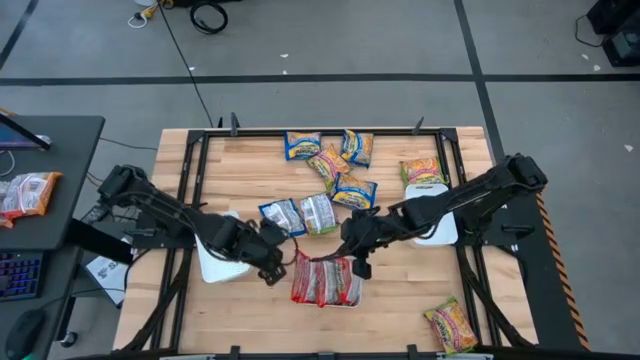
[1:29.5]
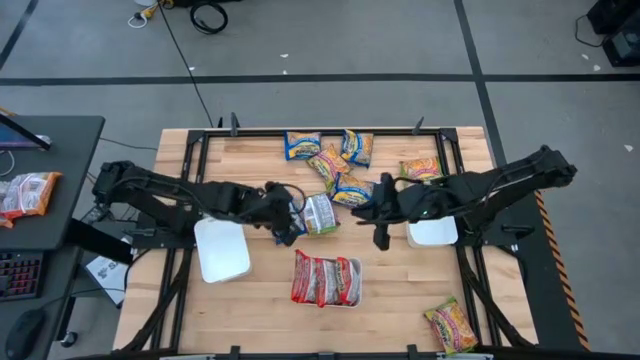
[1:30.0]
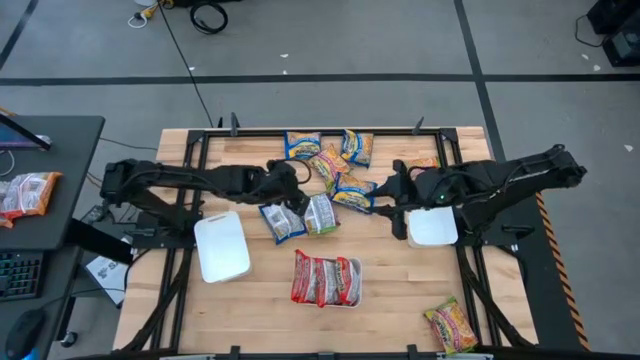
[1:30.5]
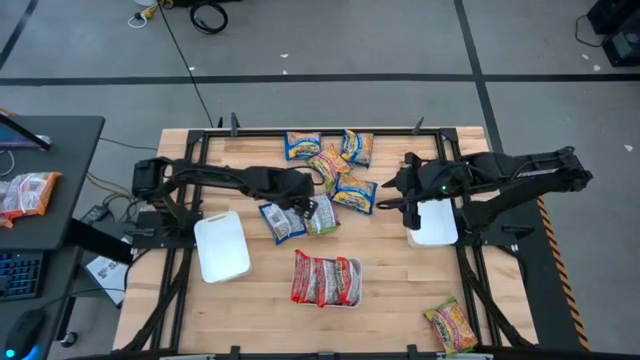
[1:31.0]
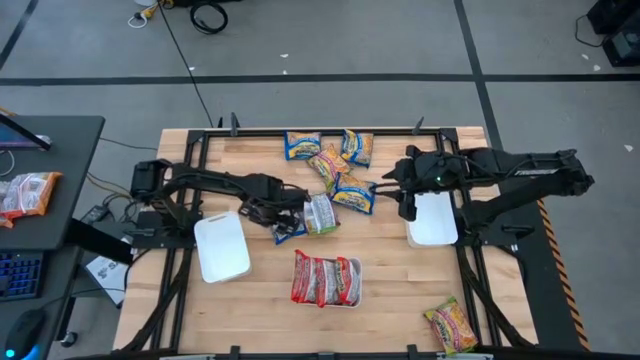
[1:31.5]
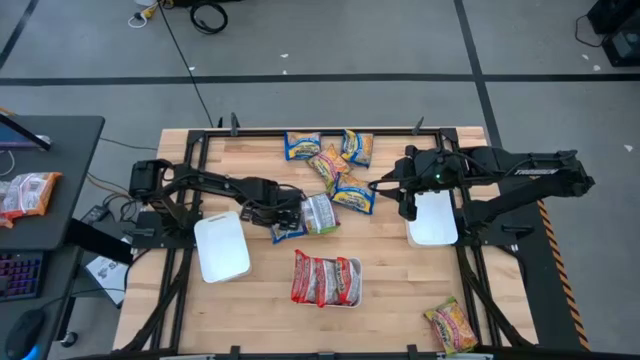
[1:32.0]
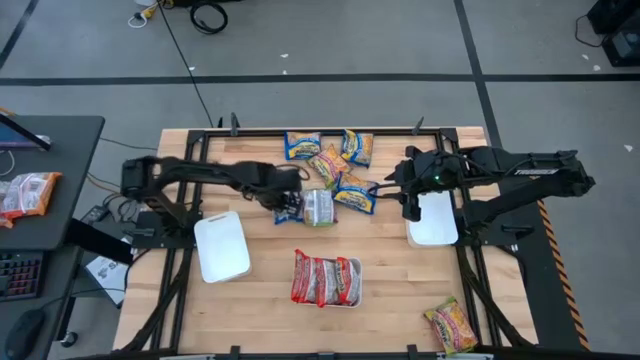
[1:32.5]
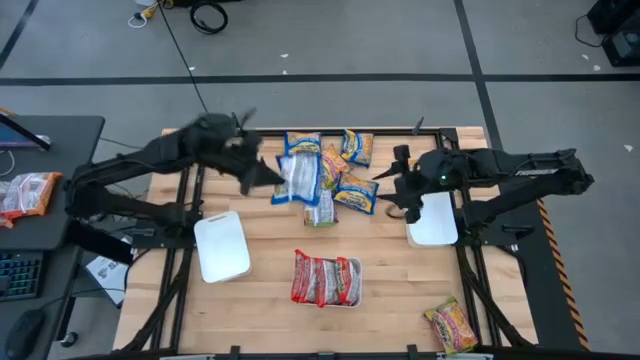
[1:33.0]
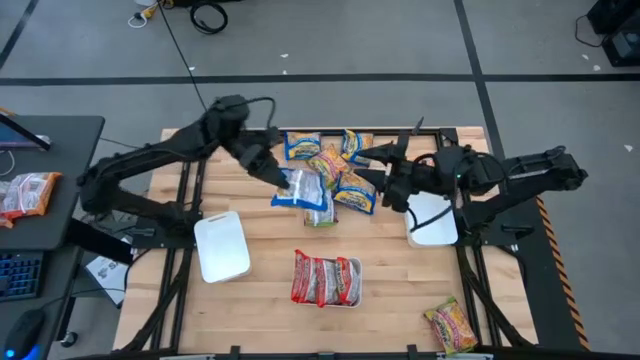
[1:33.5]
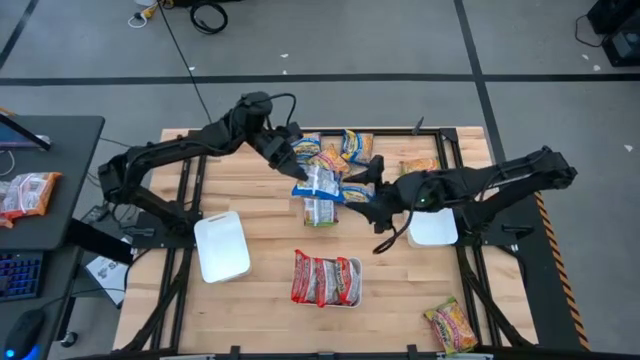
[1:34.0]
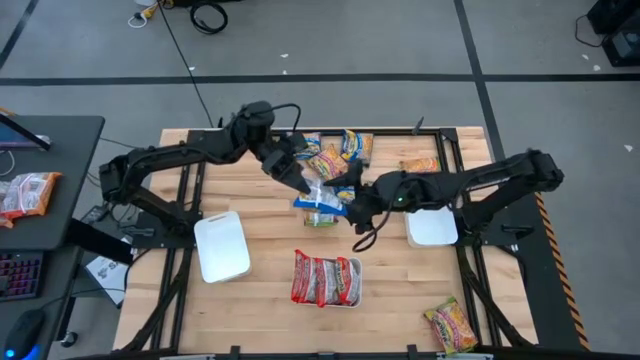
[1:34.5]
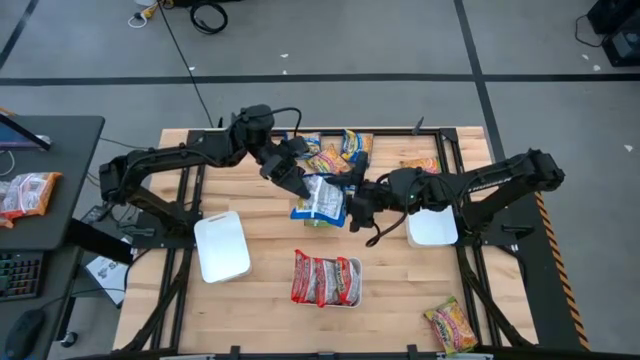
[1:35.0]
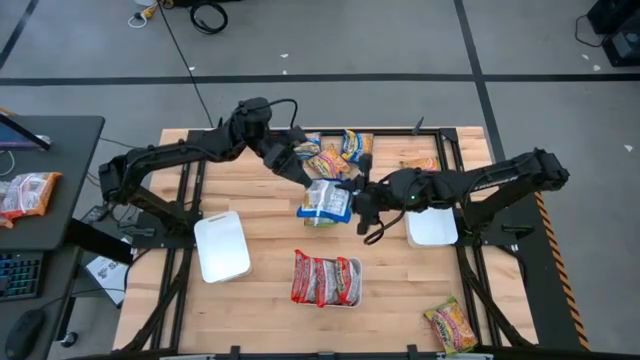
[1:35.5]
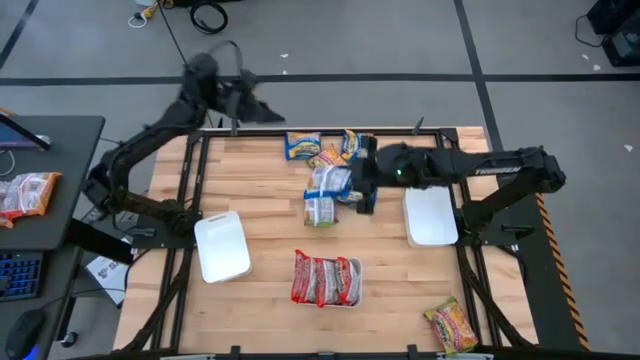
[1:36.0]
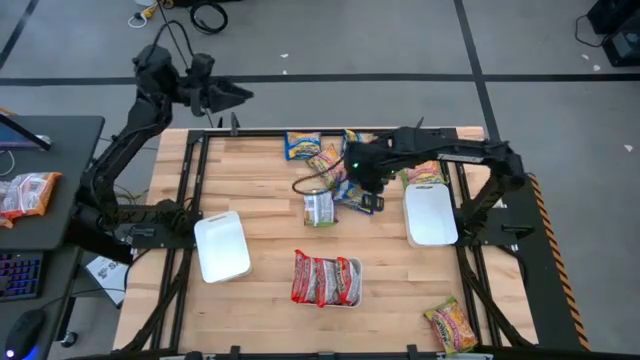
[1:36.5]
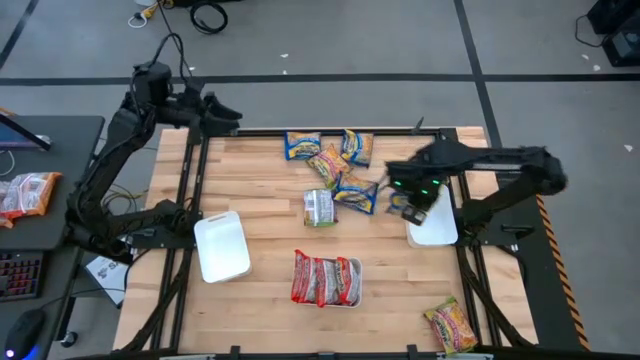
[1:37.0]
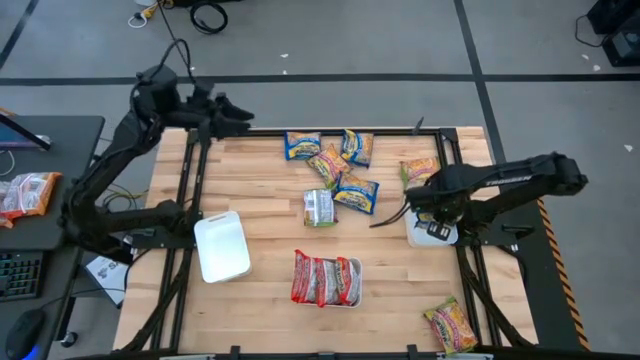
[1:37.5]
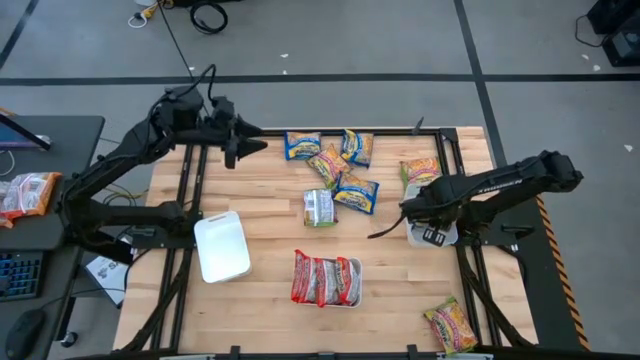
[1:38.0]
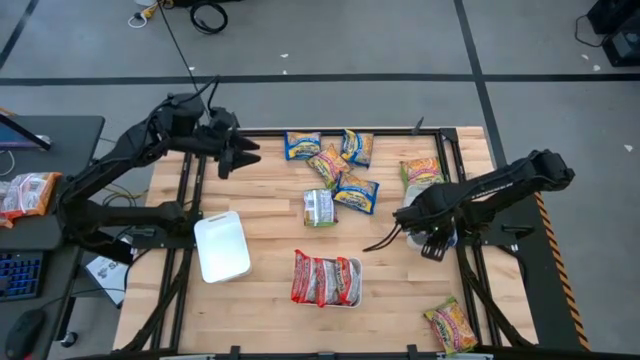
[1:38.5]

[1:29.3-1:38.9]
Task: Sort Maruchan noodles
Put the bottom left blue noodle pack into the right white bin

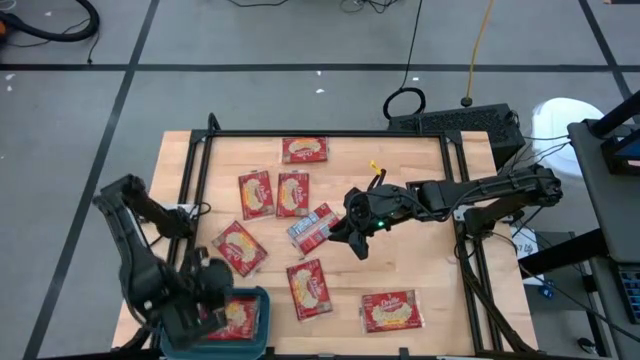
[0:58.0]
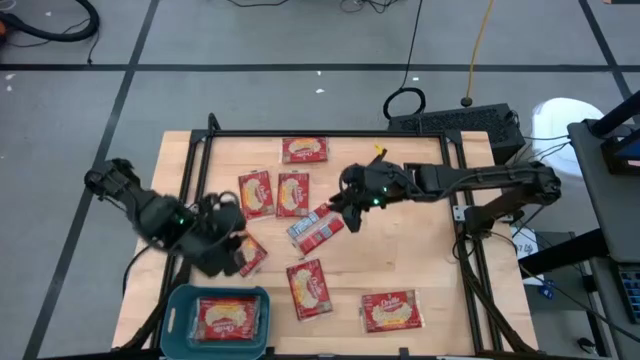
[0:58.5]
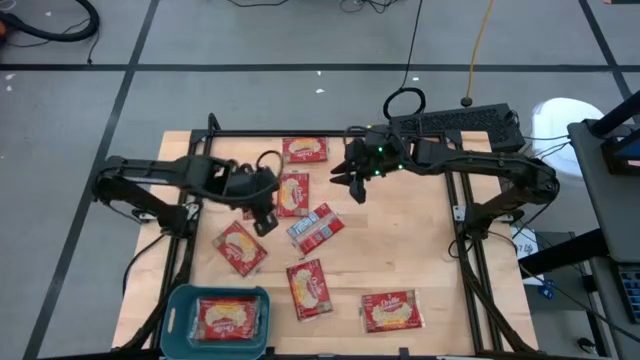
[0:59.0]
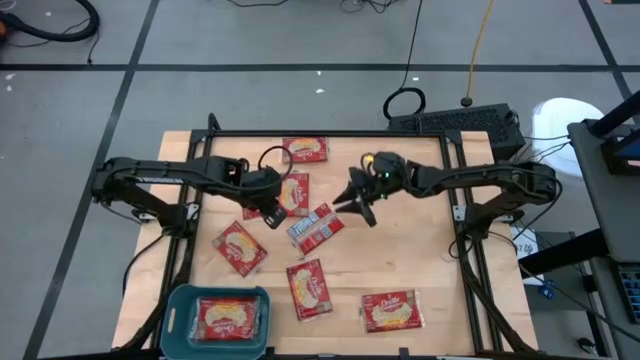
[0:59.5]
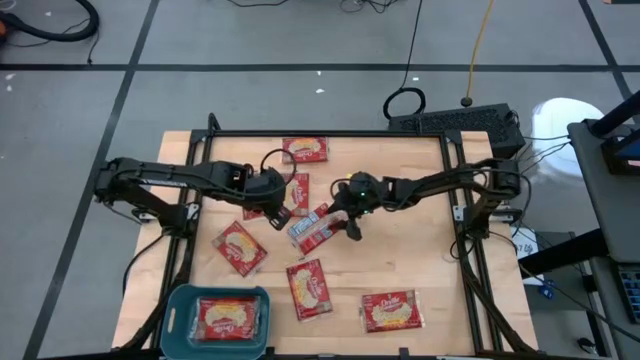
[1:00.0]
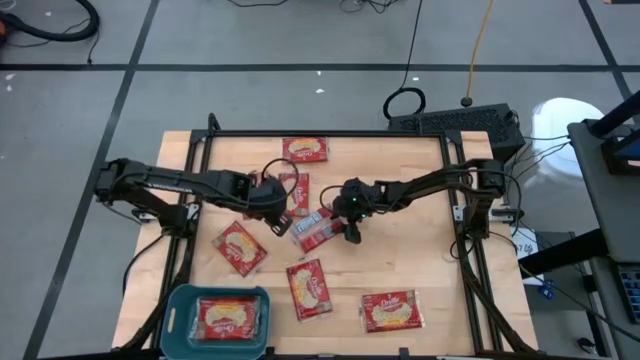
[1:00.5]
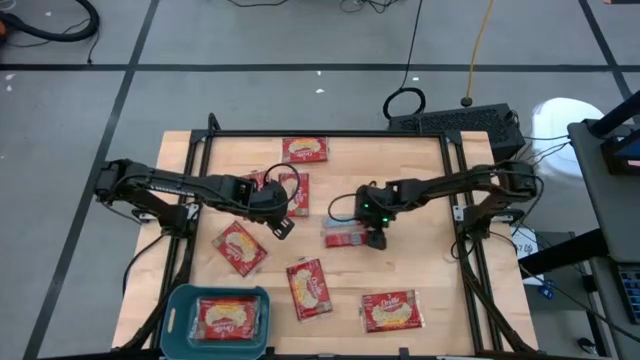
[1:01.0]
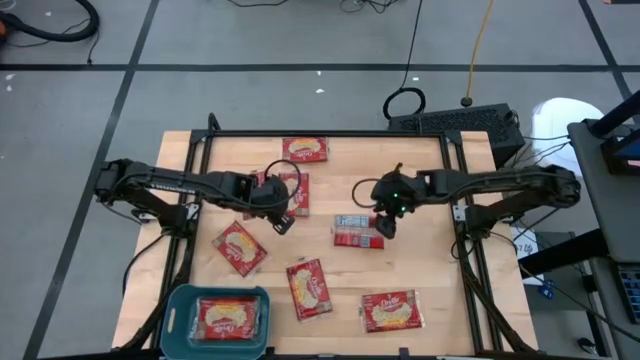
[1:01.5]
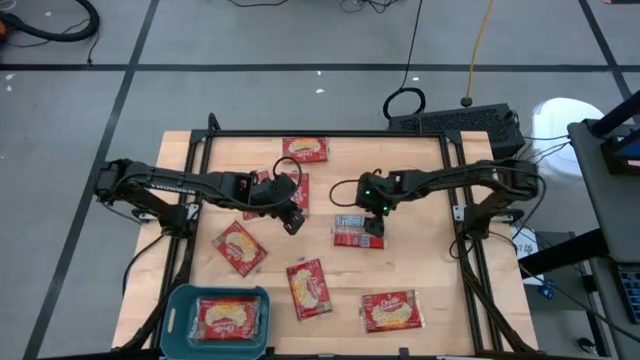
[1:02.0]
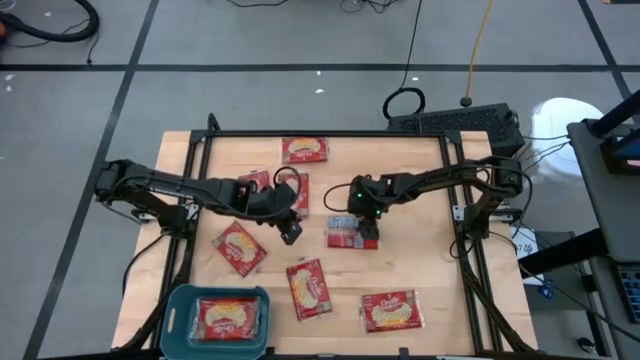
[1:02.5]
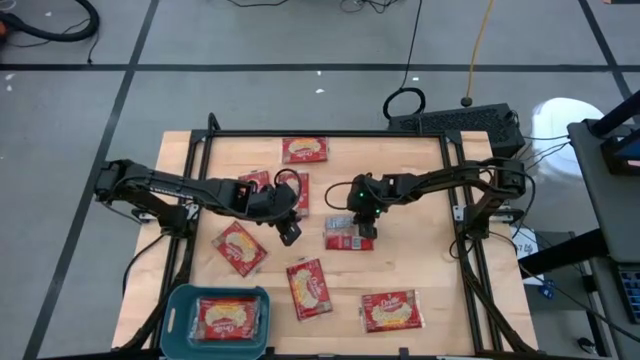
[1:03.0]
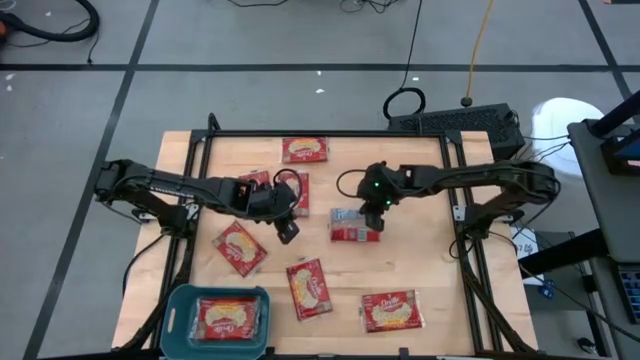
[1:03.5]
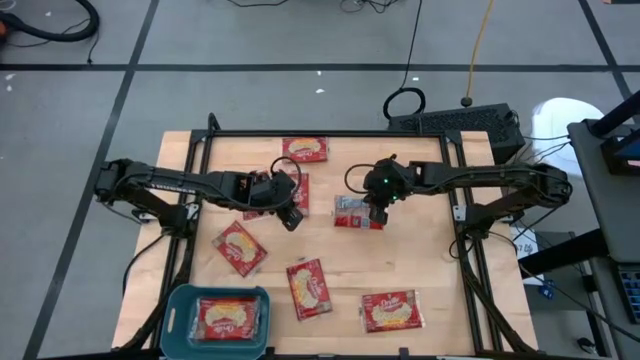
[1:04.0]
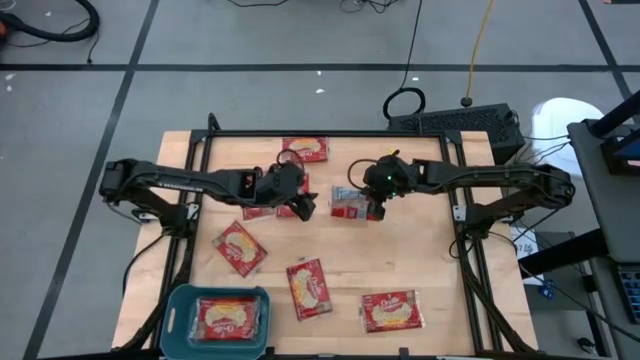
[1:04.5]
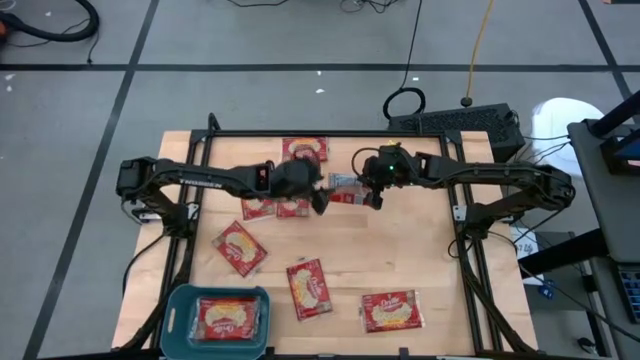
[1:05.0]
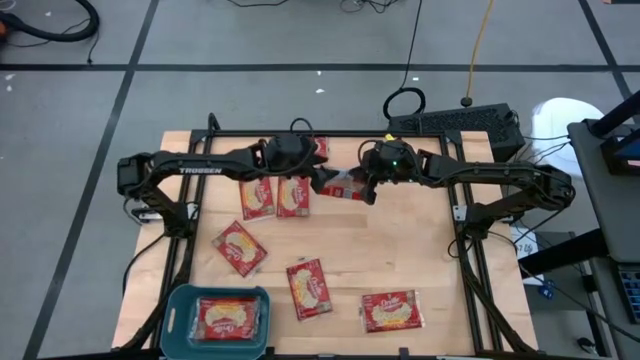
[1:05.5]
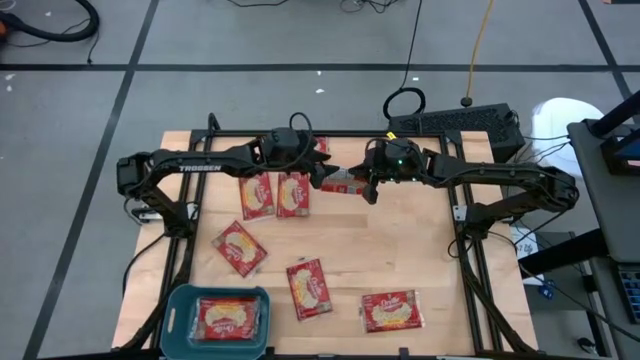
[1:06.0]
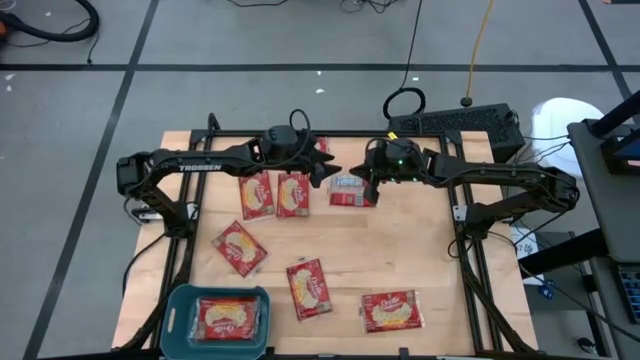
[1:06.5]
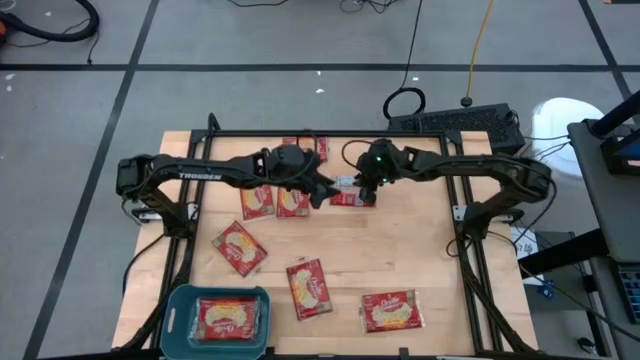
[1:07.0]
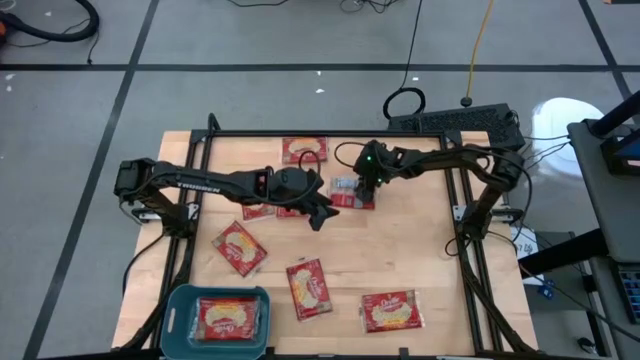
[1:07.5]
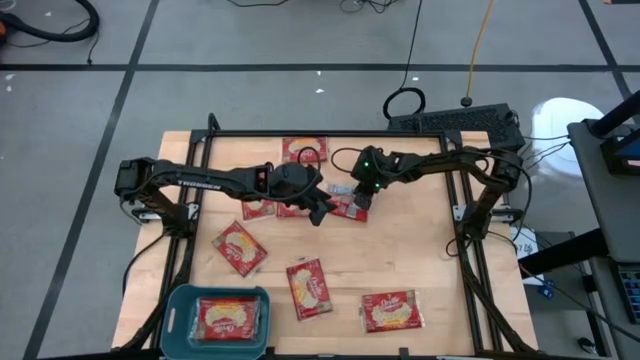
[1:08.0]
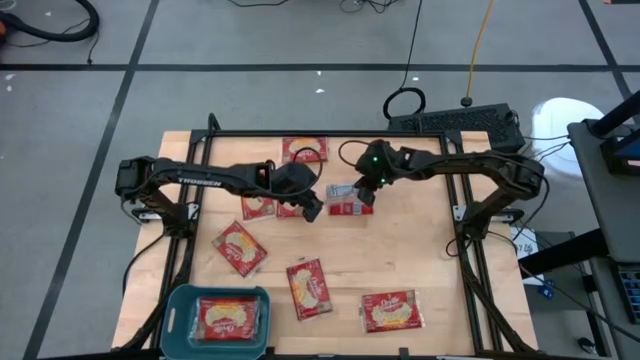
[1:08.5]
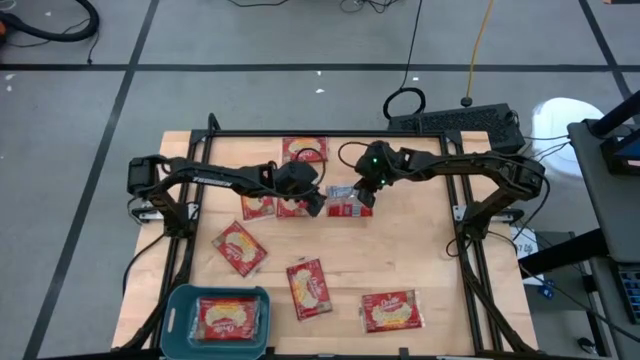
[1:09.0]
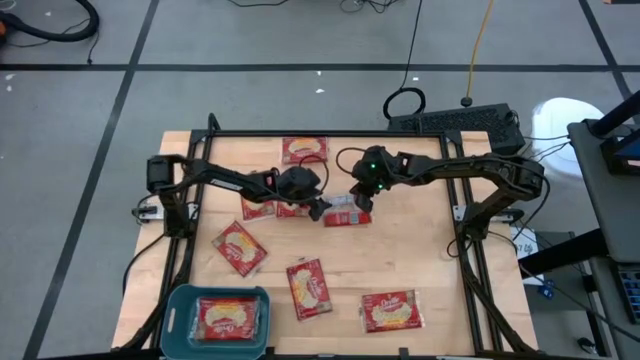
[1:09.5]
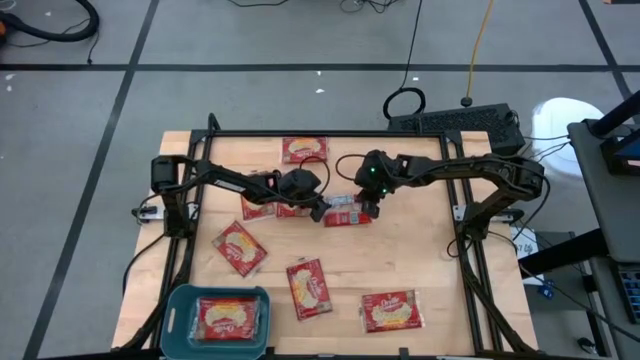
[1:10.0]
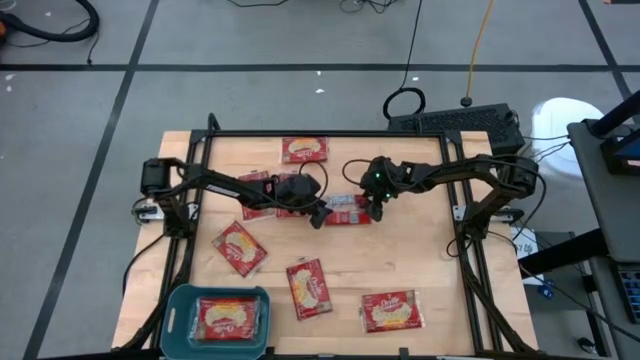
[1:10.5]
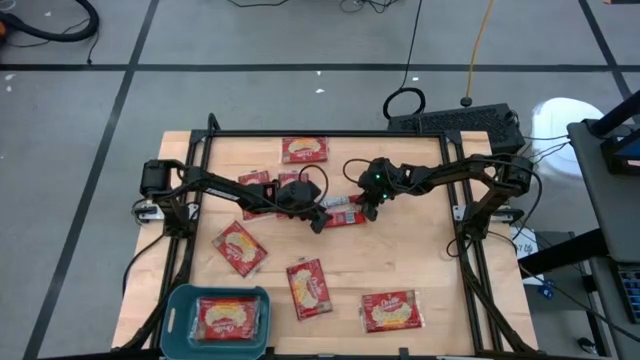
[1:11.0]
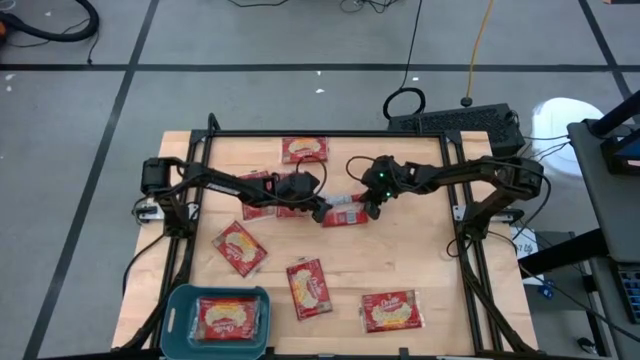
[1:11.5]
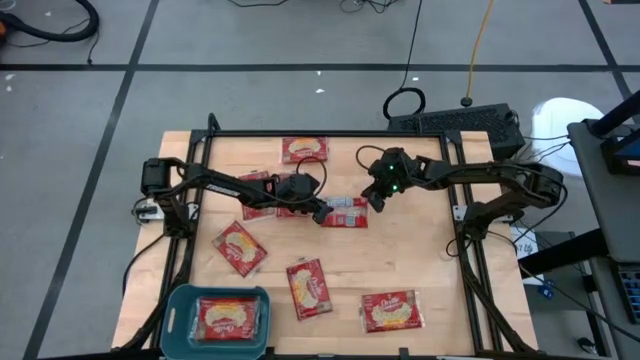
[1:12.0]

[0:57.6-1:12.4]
Task: Sort popcorn bags into baskets
Put the popcorn sachet into the bin
